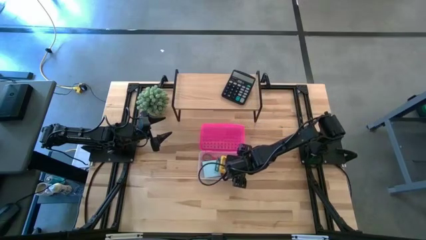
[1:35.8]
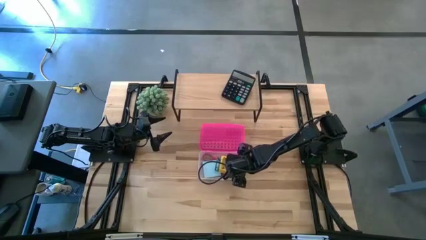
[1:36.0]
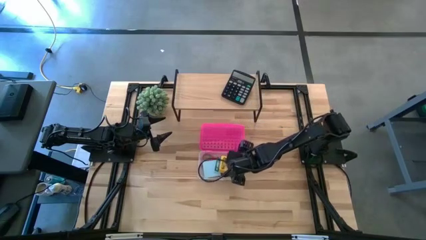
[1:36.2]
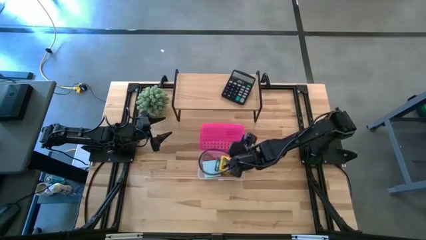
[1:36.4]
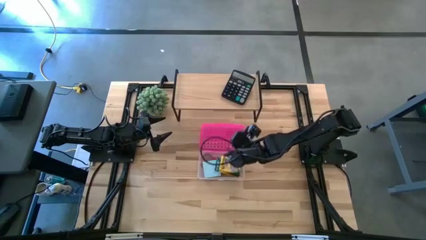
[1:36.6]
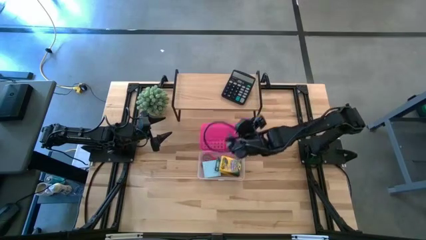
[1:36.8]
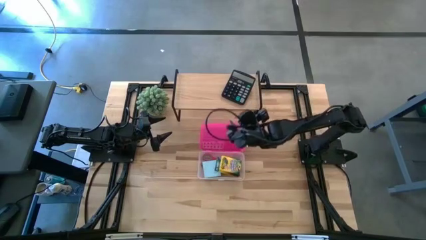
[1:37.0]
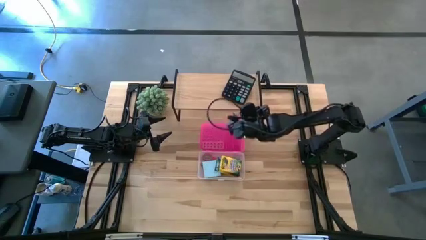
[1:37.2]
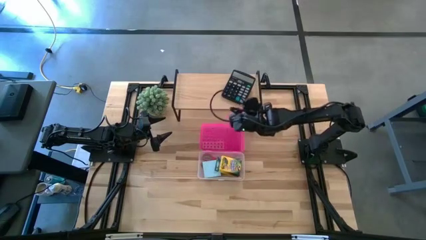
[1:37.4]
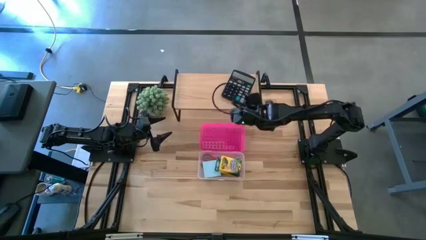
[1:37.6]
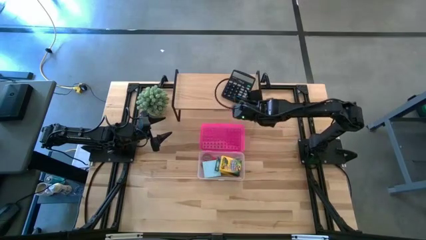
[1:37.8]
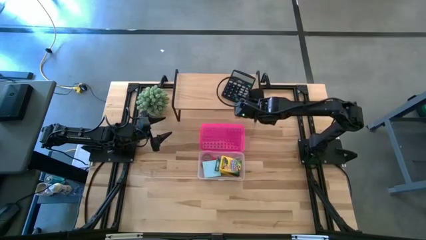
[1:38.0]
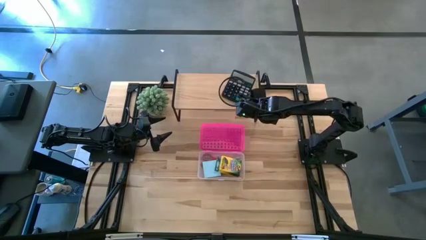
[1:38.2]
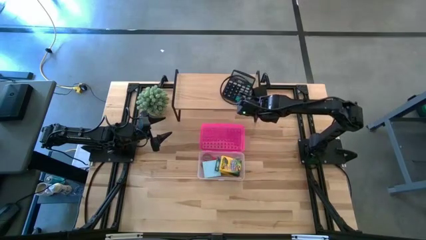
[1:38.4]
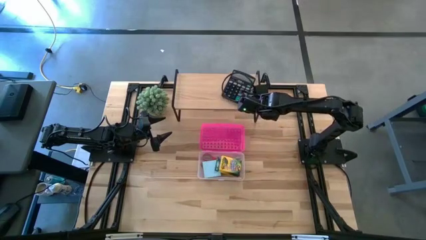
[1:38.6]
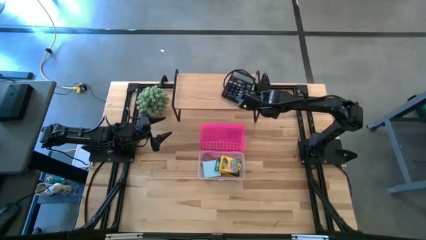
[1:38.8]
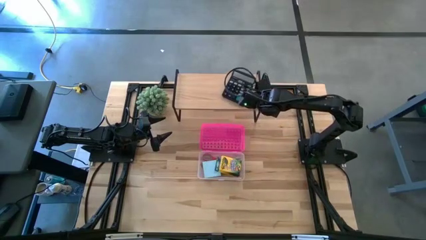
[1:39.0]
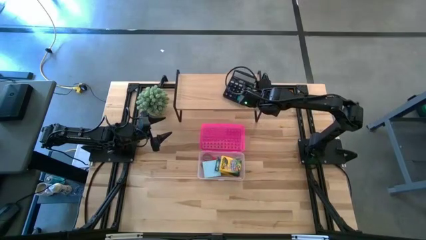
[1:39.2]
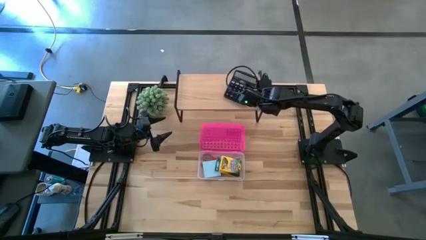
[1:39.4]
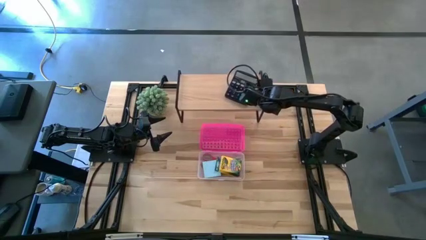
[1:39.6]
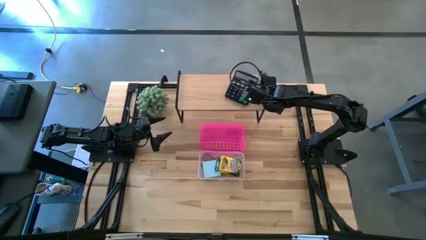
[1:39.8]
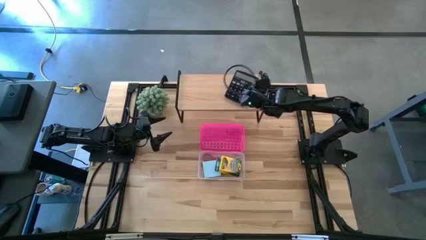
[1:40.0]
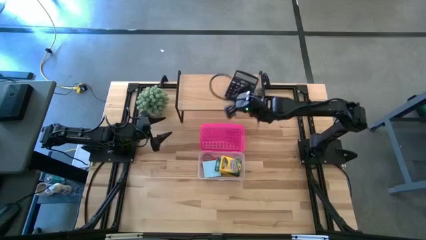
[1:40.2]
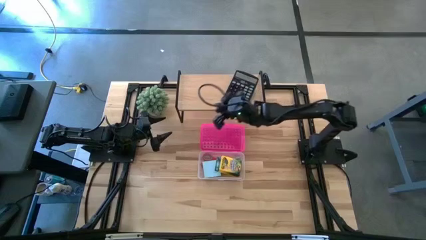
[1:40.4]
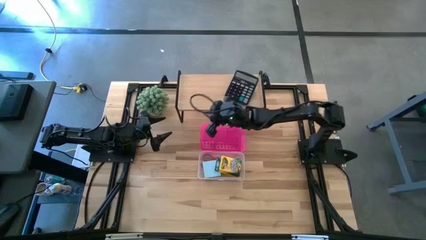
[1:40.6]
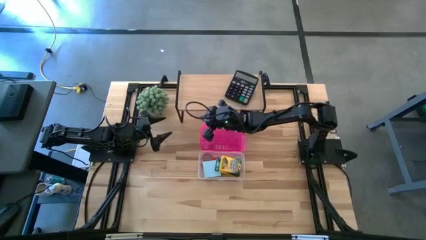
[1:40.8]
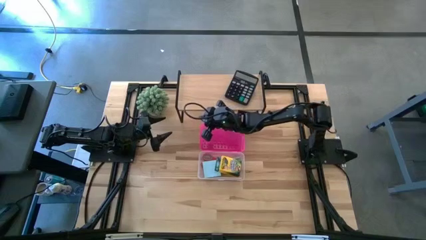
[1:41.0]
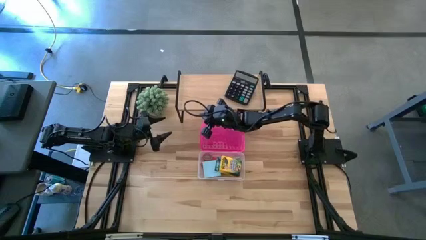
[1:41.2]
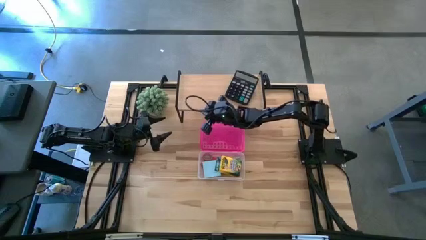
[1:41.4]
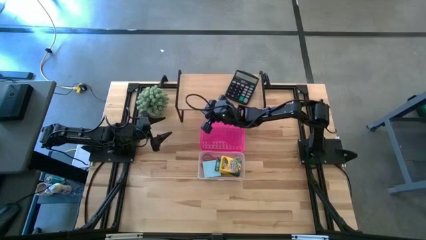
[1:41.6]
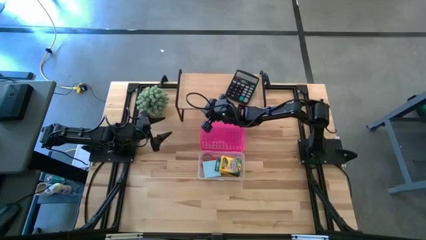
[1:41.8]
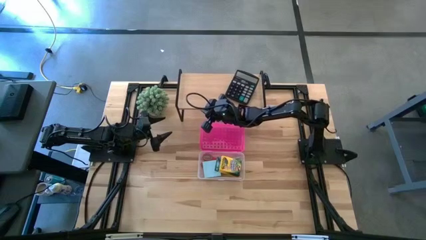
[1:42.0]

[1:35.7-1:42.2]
Task: Pack school essentials
Adjust the shelf

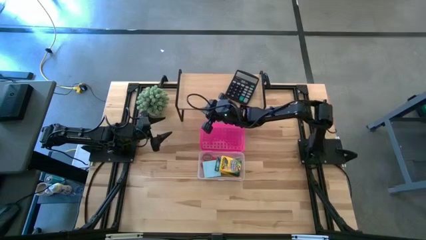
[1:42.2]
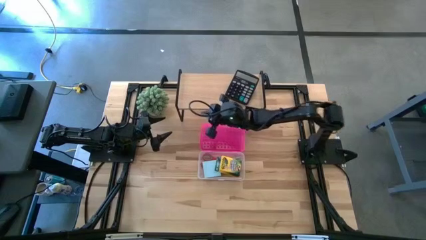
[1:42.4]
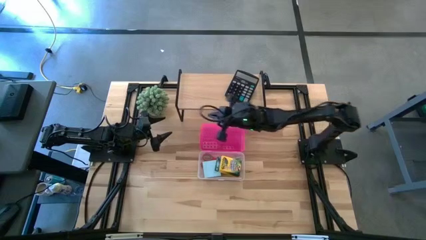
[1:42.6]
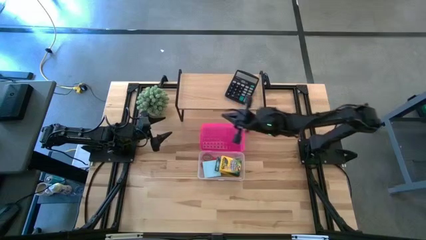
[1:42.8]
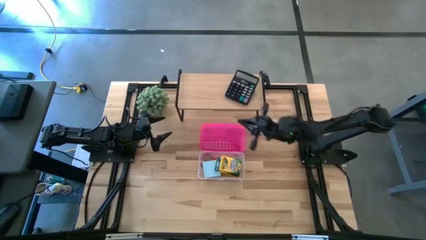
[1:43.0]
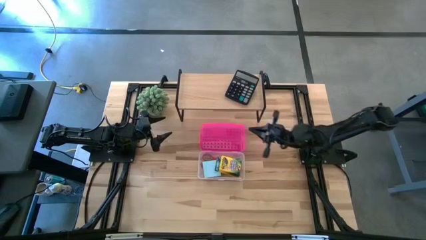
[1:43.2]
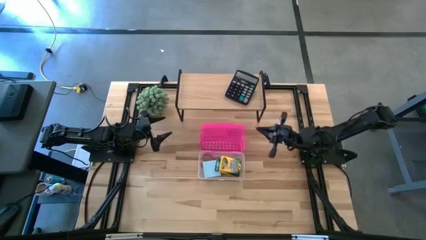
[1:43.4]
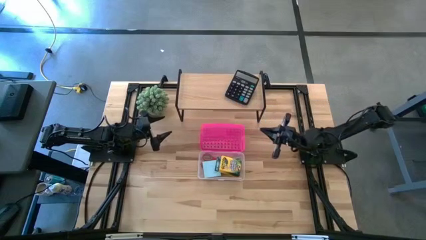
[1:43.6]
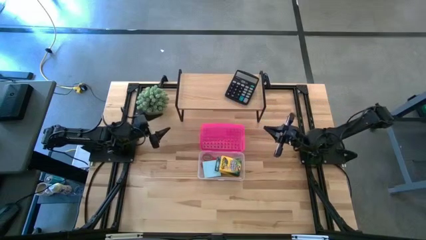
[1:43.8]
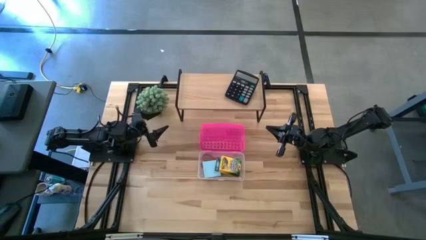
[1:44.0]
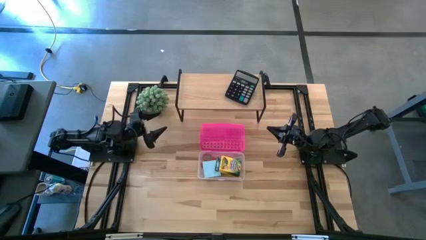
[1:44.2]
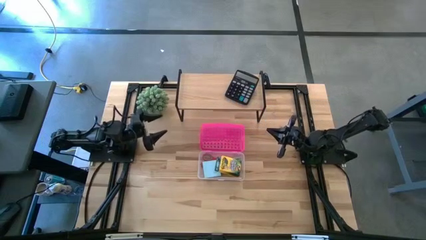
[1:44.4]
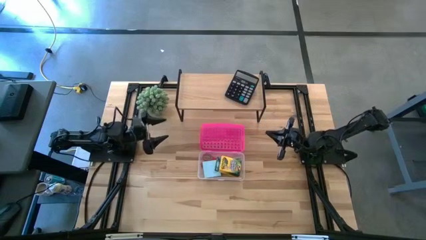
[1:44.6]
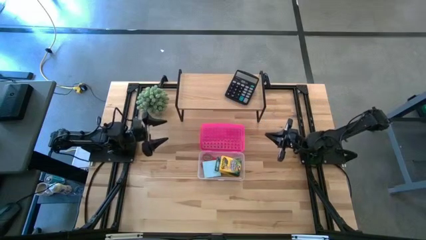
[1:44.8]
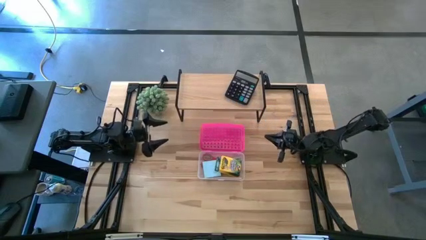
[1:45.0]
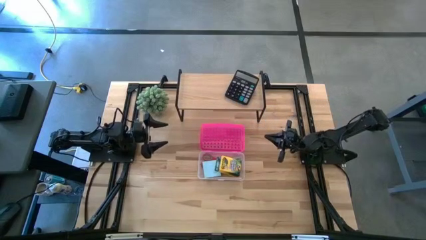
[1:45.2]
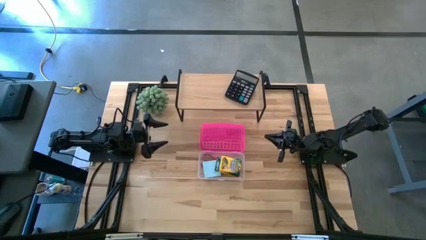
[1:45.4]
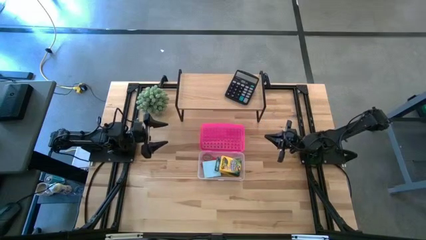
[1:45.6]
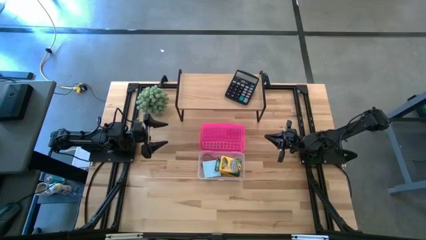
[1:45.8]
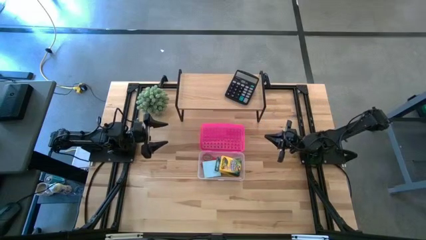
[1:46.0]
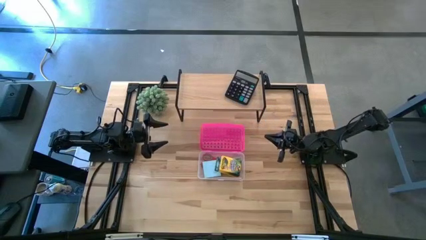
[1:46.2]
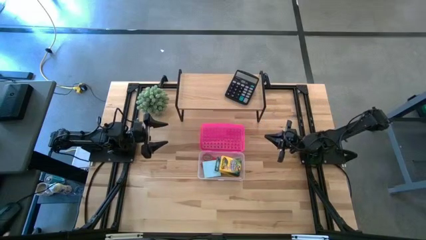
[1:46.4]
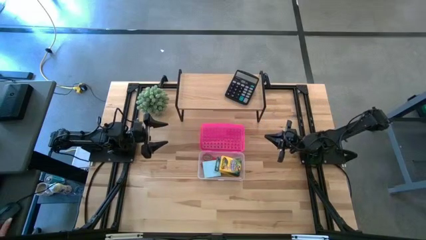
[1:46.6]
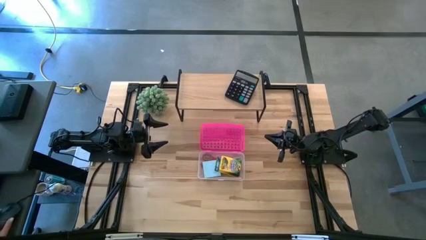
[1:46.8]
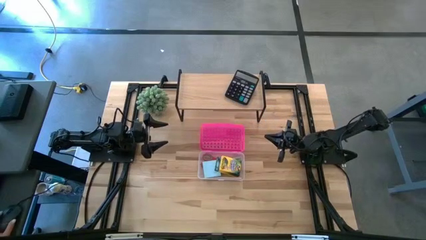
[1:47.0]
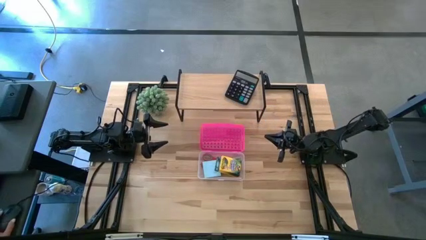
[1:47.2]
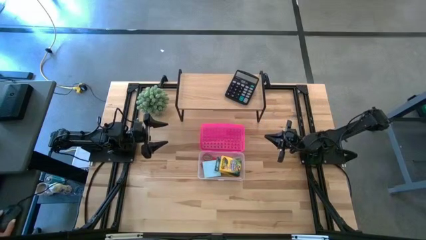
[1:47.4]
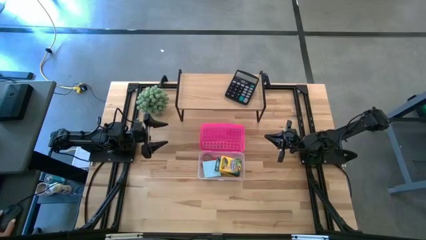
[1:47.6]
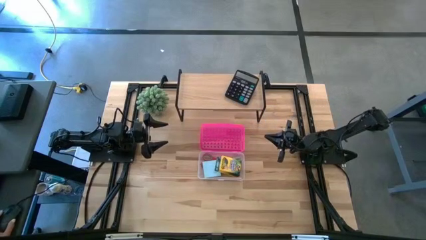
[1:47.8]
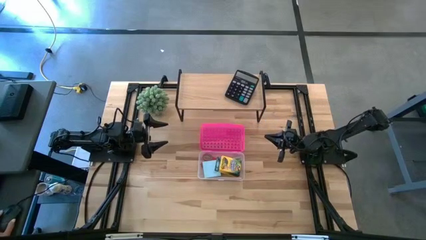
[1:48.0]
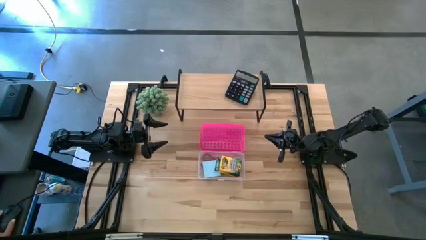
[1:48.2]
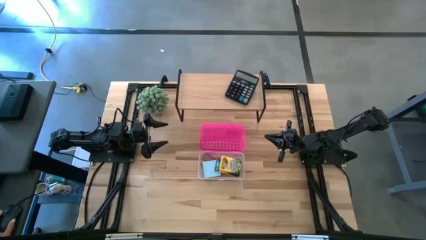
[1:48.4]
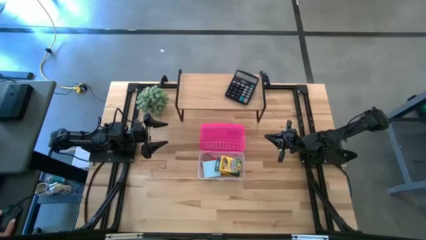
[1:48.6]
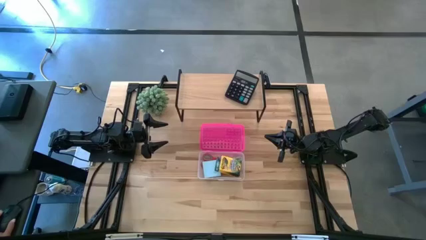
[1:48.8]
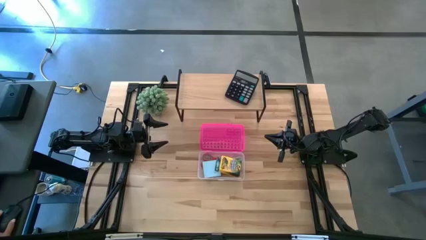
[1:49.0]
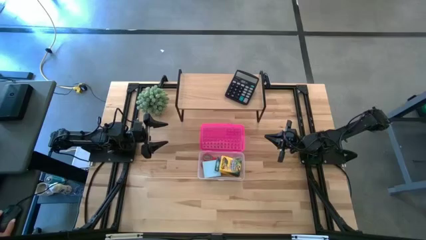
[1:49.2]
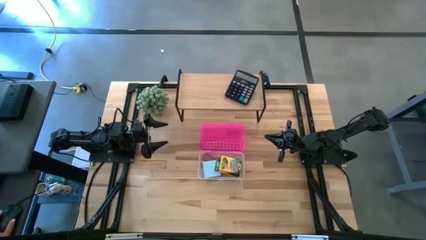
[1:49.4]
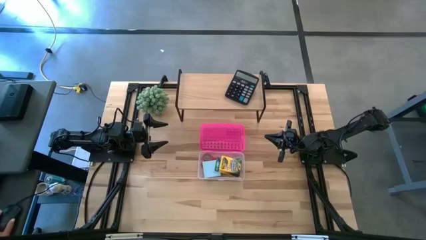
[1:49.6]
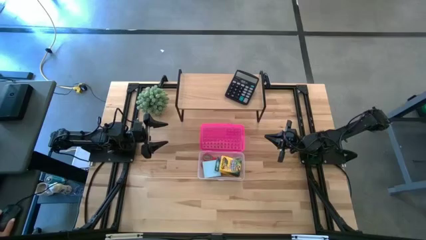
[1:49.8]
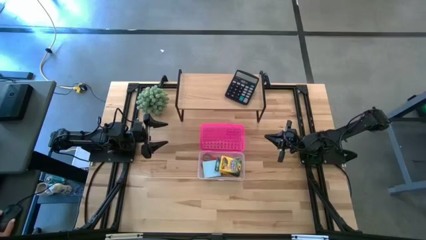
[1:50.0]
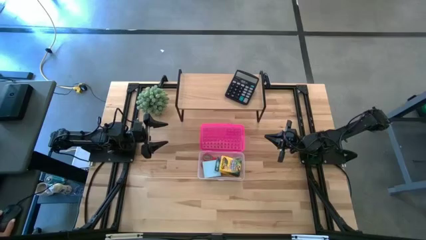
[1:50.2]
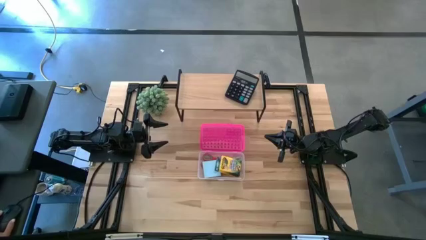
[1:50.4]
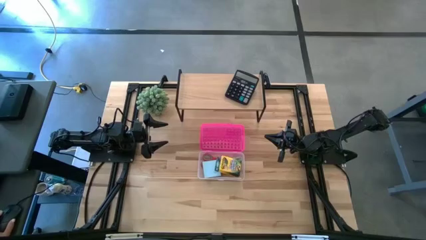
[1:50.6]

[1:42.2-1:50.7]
Return to Home Position
